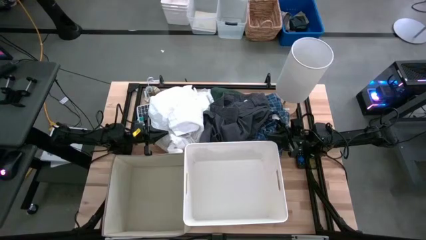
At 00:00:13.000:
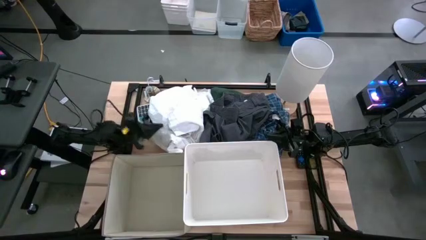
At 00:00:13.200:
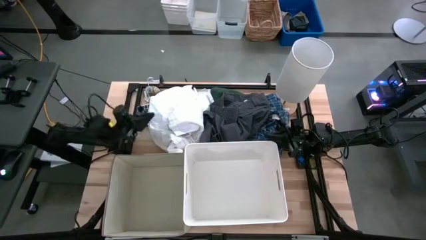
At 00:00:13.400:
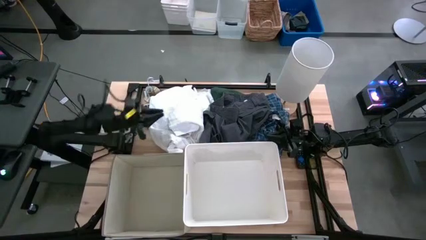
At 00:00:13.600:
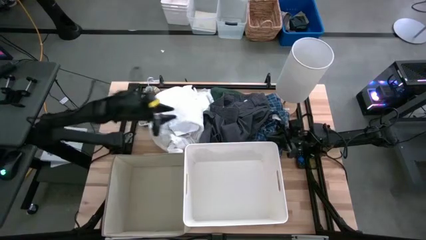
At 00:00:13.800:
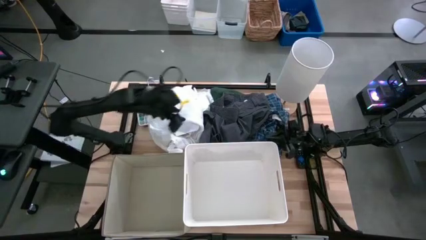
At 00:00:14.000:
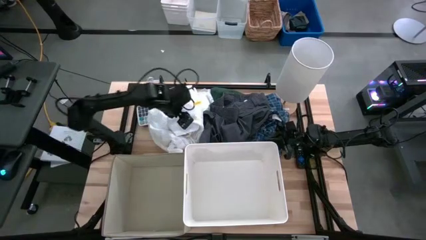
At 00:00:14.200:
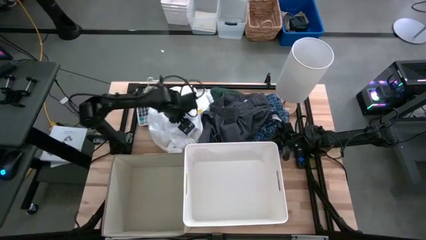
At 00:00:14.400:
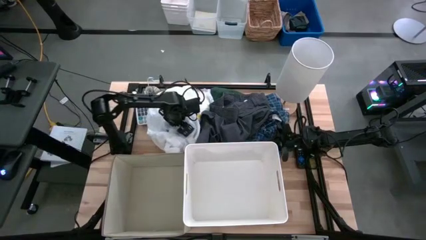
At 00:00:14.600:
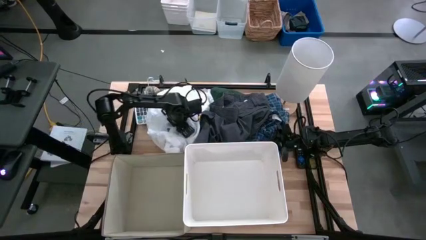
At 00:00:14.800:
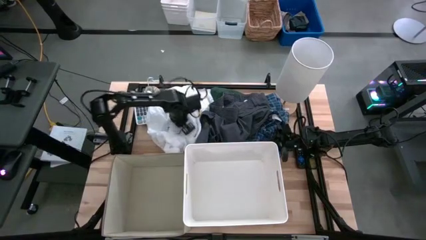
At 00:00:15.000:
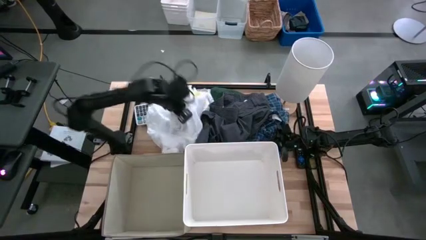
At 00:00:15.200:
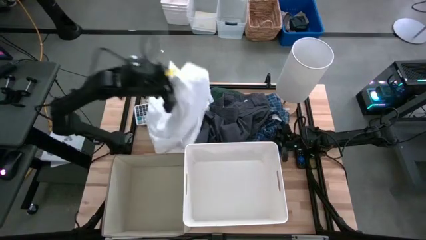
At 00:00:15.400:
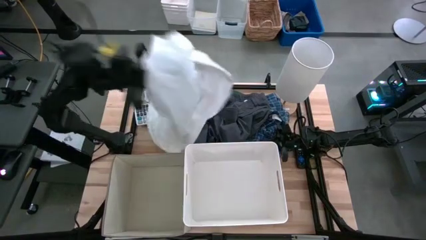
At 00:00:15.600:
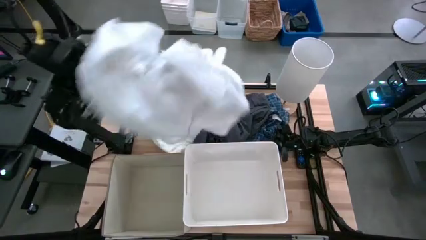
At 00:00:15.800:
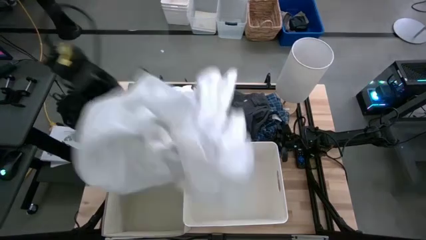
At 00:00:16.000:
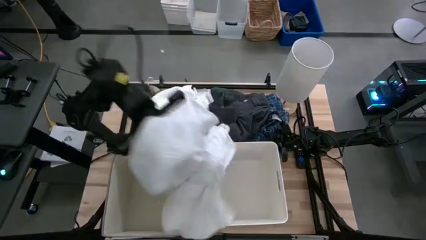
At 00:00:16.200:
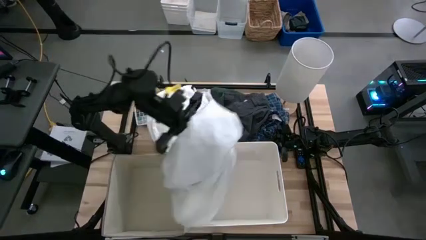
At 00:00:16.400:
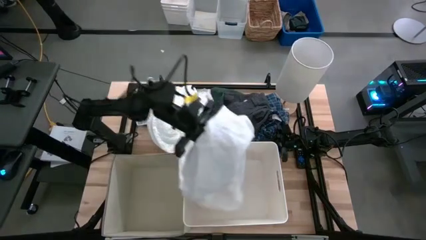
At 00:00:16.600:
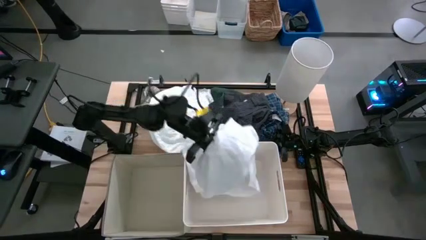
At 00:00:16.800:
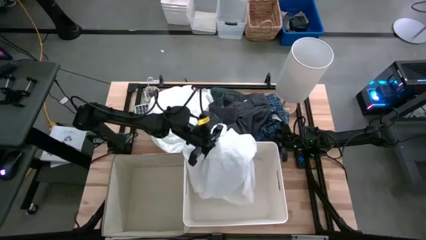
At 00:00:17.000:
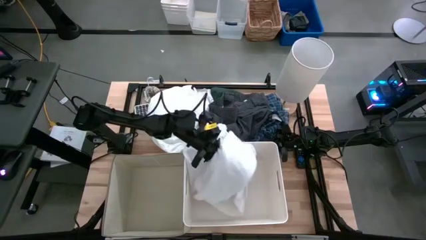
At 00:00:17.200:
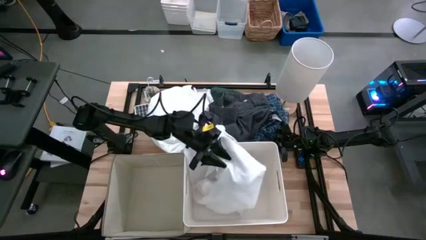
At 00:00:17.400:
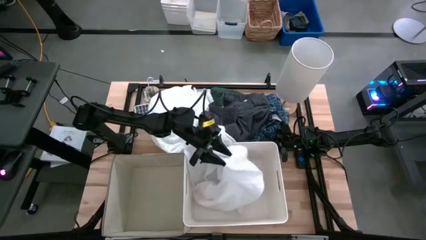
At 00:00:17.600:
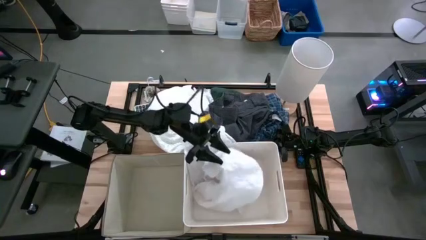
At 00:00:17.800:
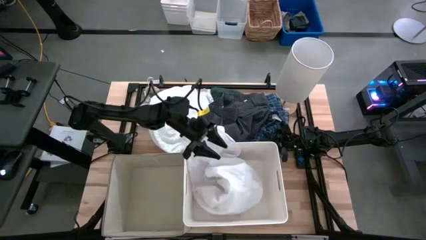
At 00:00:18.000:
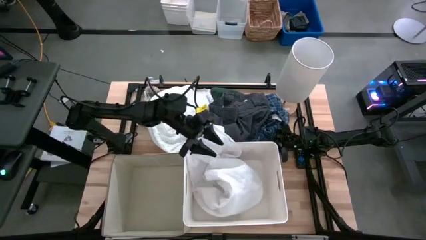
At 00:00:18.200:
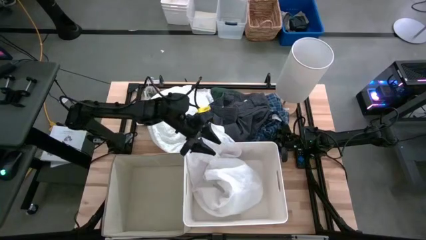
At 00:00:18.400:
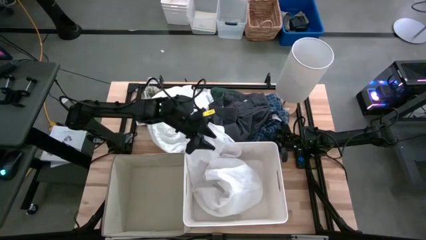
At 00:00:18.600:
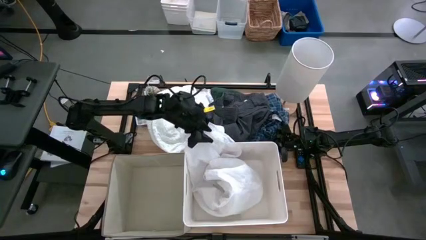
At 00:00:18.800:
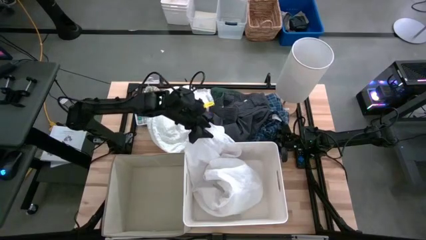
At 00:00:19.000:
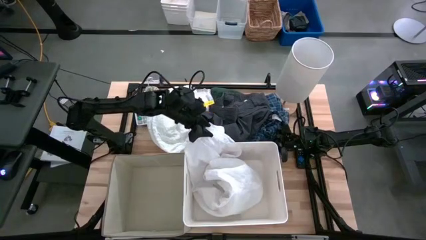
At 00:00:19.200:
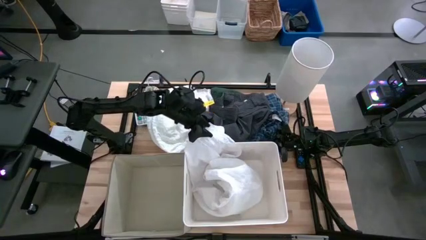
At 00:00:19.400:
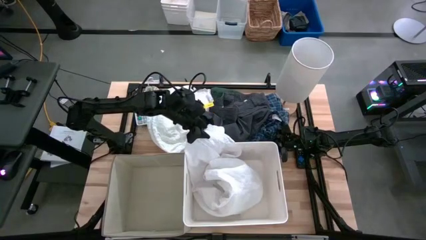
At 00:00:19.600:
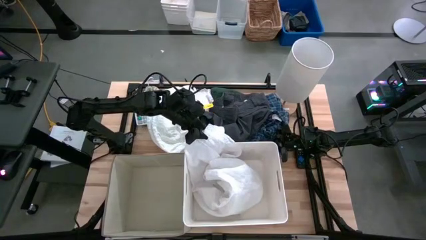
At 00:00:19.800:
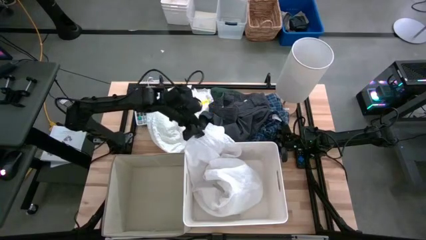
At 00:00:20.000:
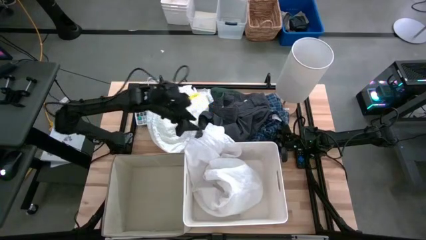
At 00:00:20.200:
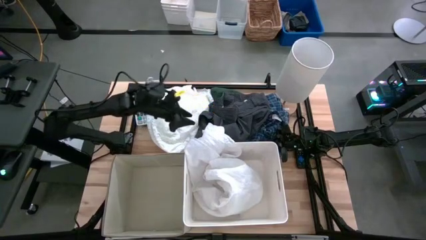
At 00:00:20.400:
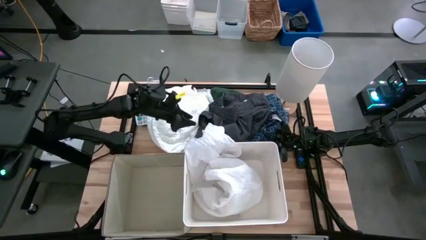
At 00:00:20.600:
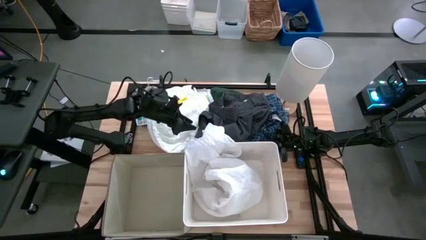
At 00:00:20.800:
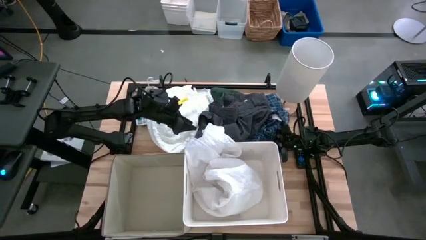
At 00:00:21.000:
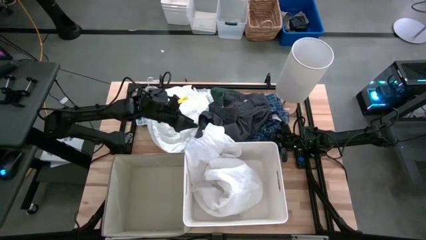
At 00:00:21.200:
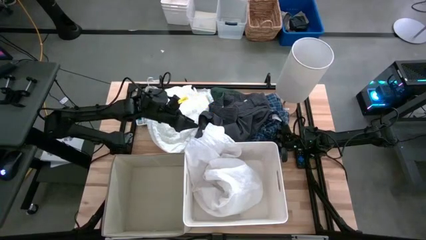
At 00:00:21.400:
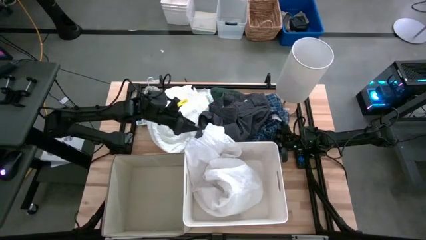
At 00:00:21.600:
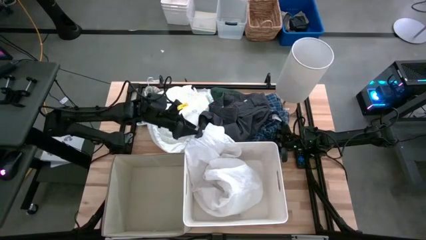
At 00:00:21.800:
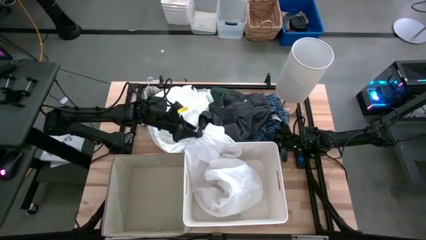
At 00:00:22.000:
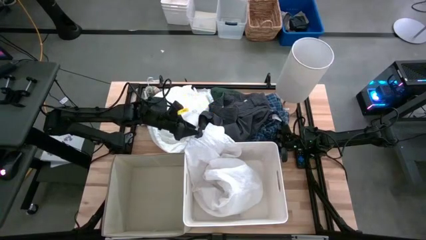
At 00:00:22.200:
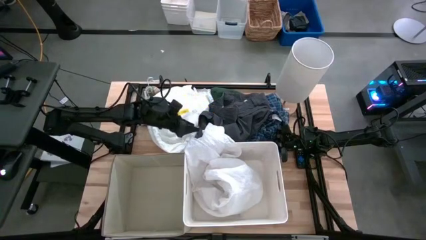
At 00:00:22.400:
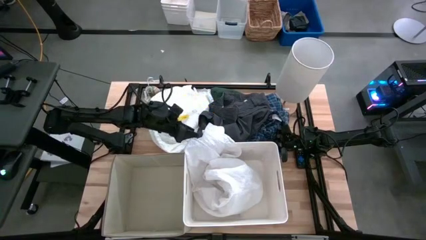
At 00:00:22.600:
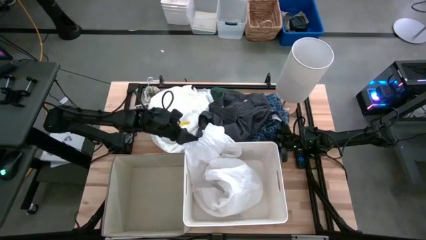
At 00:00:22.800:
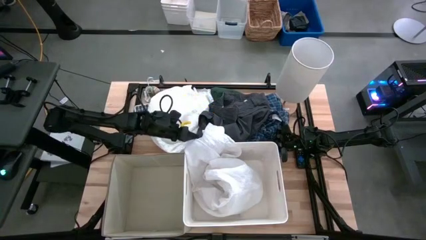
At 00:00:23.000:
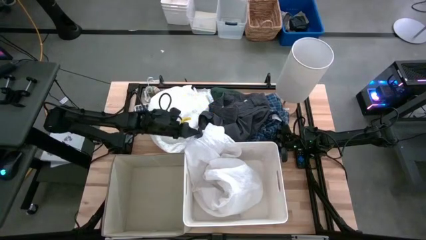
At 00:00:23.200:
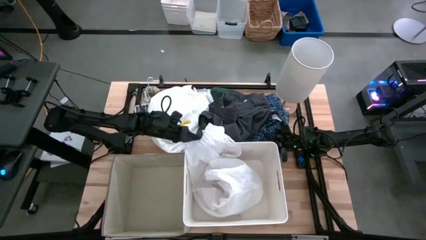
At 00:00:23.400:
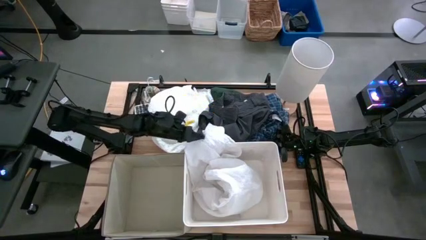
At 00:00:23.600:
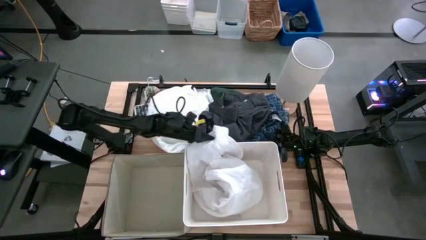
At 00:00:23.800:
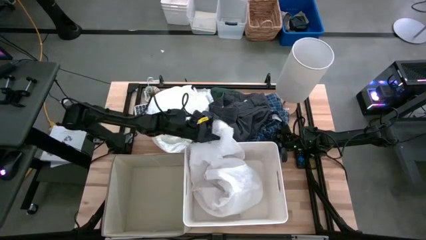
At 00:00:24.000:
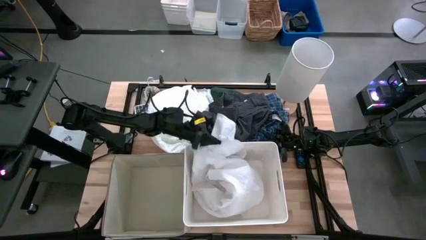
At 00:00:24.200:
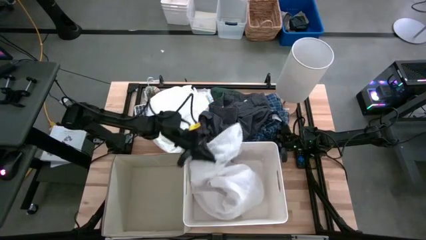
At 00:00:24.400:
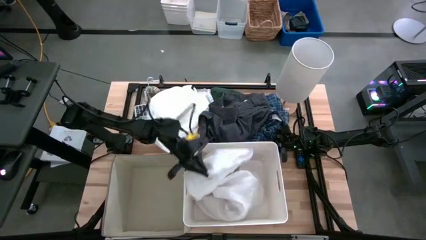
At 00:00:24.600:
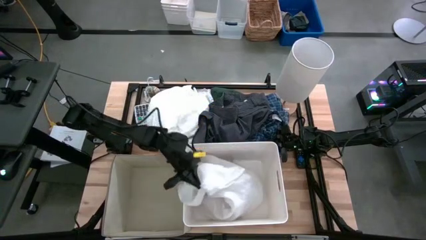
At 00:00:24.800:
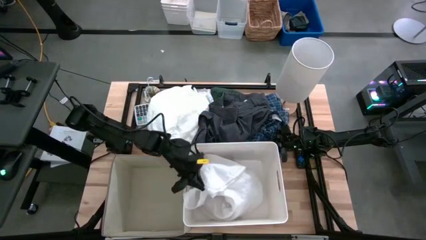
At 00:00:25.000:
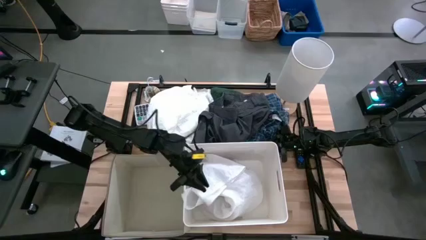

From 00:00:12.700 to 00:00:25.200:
Task: Sort clothes
Put the white polo shirt into the white laundry organizer

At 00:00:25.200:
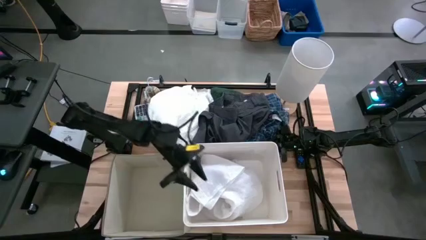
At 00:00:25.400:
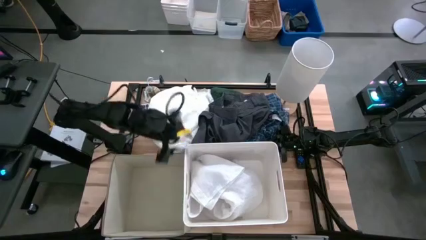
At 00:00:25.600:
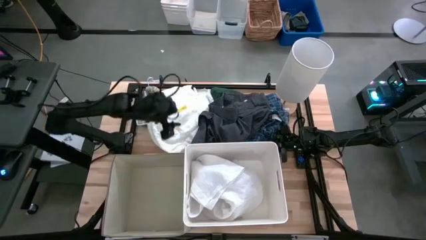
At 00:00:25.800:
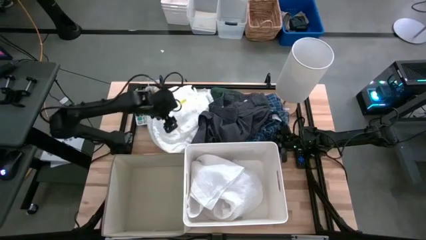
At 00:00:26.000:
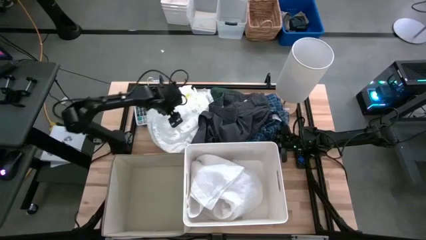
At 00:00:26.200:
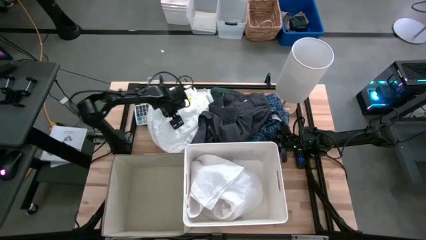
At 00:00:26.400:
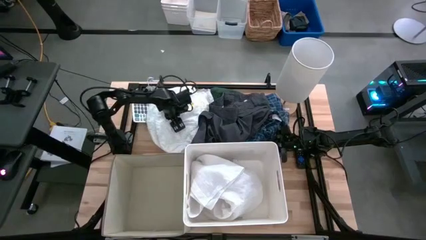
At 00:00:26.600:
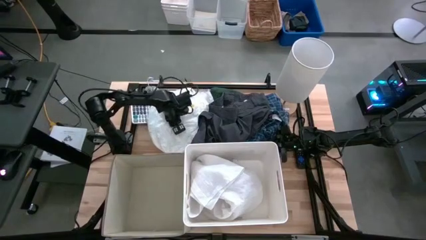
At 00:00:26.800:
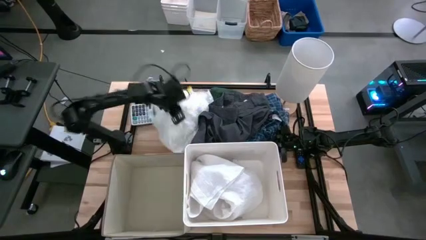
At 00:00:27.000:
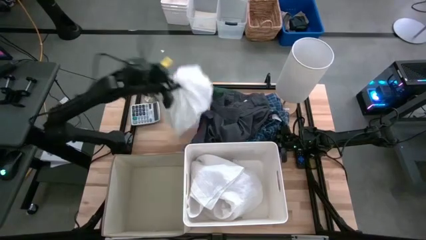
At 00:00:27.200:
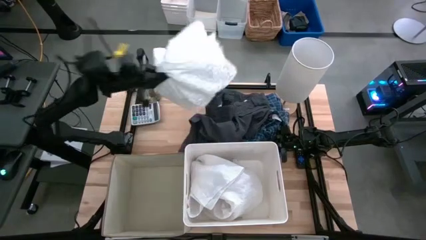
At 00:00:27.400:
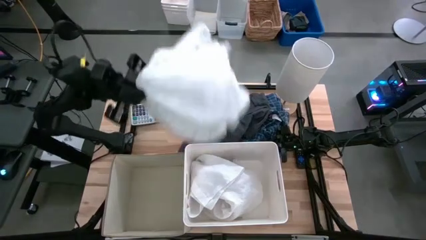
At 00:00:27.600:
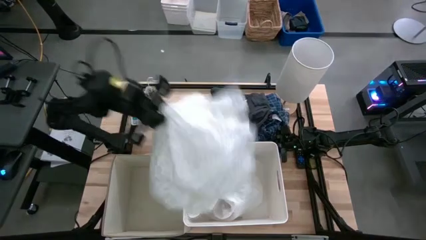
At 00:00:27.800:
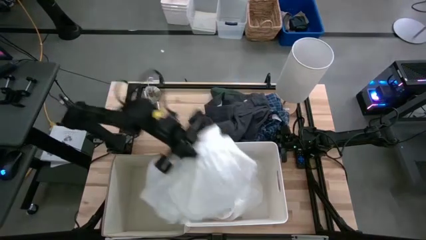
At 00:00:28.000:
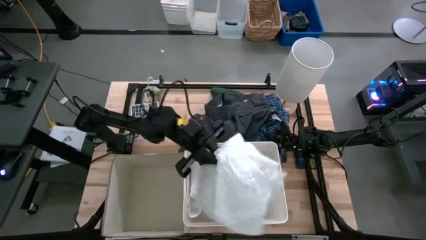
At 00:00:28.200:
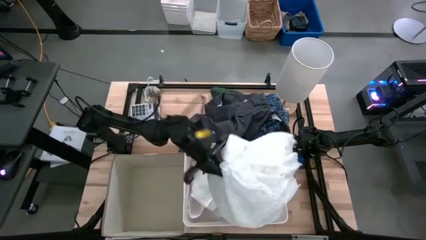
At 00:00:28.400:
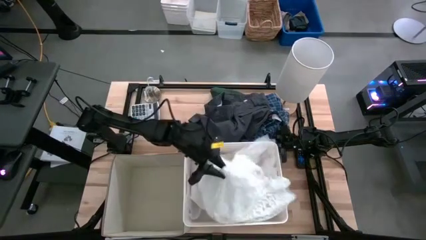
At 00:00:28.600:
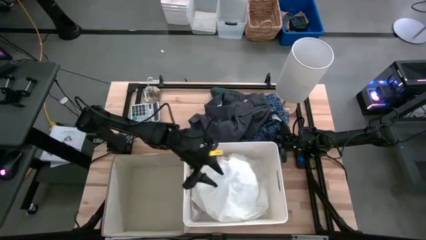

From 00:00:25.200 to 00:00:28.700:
Put the white blouse into the white laundry organizer
